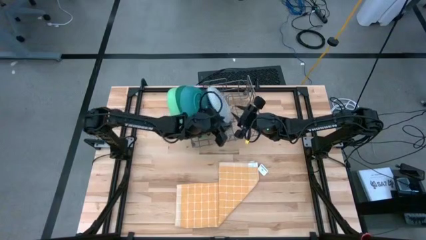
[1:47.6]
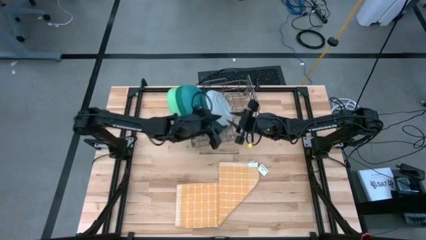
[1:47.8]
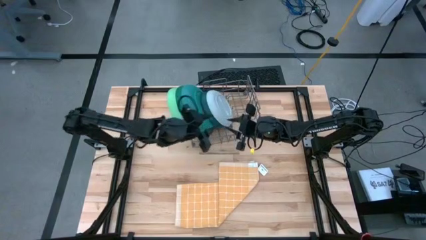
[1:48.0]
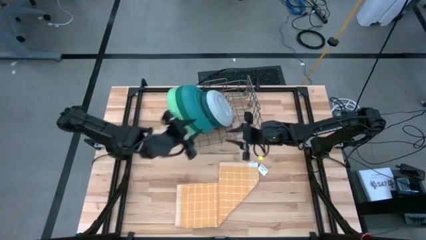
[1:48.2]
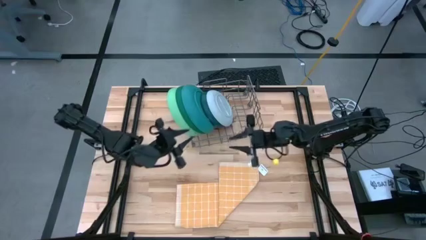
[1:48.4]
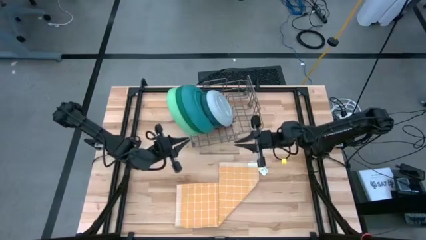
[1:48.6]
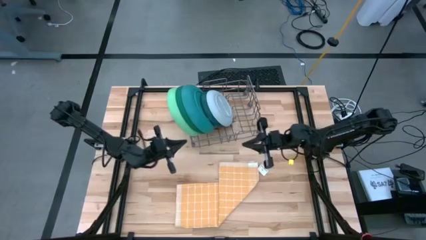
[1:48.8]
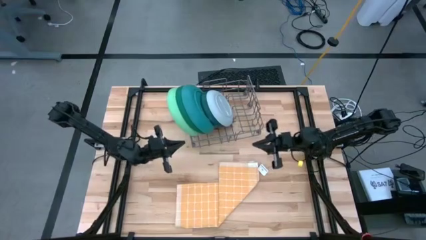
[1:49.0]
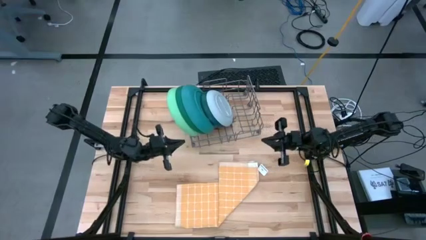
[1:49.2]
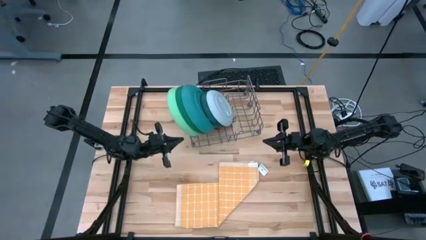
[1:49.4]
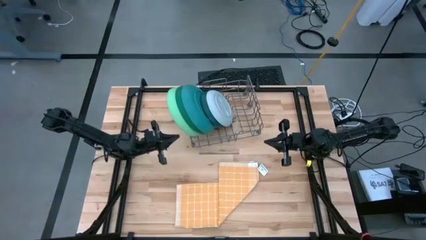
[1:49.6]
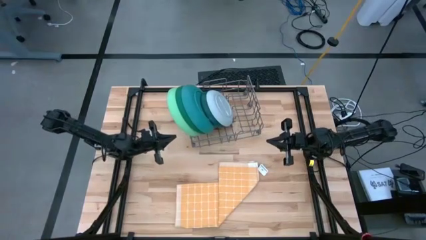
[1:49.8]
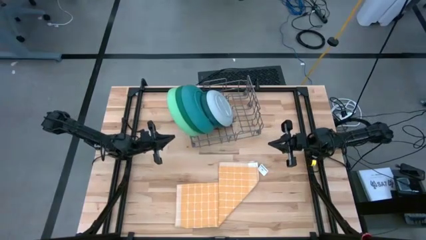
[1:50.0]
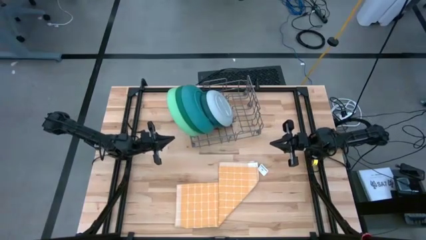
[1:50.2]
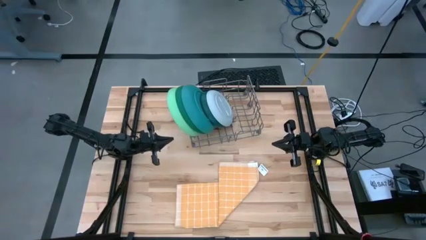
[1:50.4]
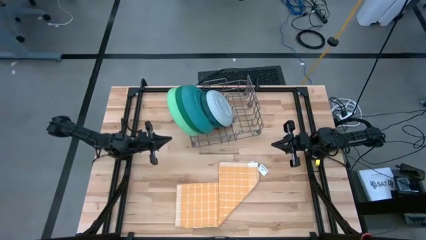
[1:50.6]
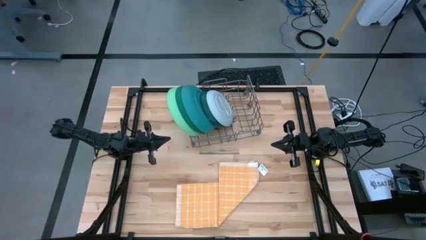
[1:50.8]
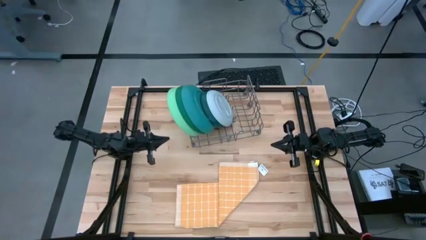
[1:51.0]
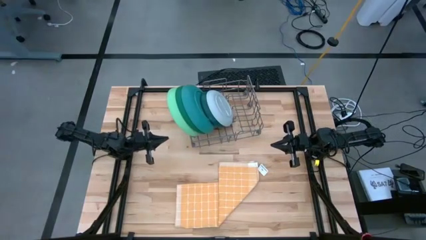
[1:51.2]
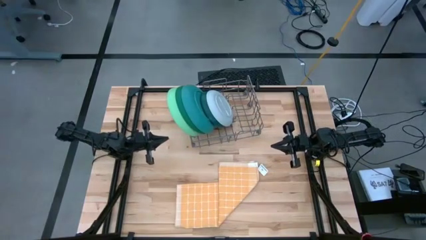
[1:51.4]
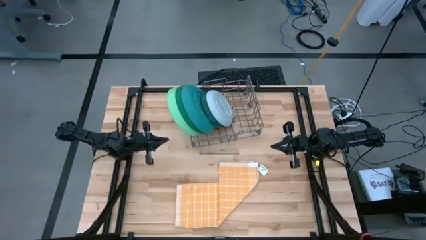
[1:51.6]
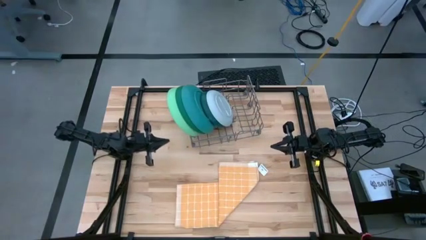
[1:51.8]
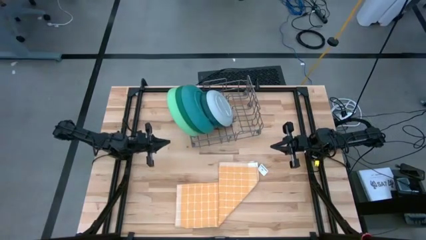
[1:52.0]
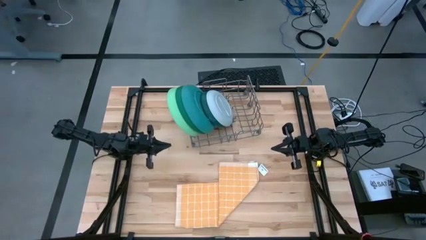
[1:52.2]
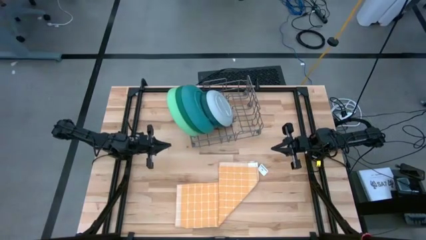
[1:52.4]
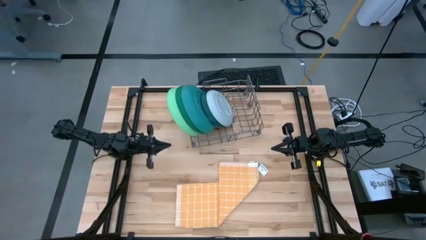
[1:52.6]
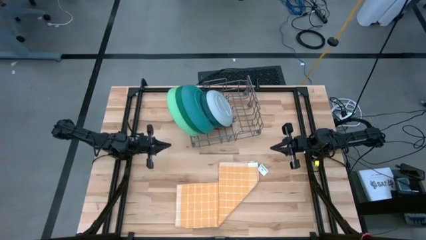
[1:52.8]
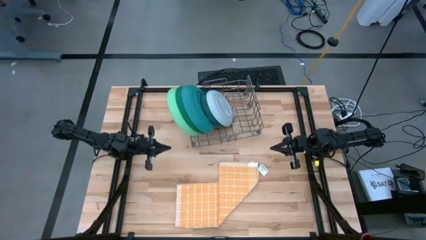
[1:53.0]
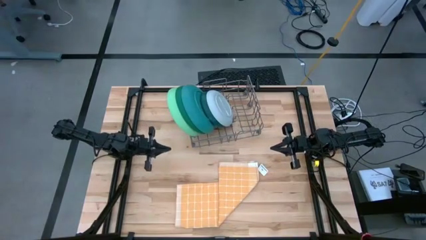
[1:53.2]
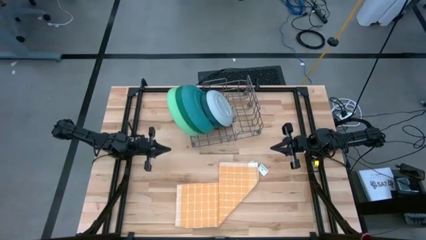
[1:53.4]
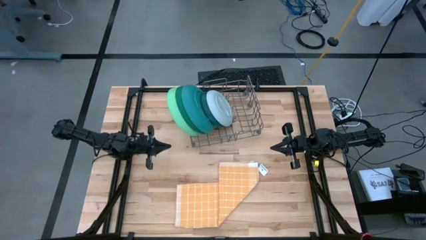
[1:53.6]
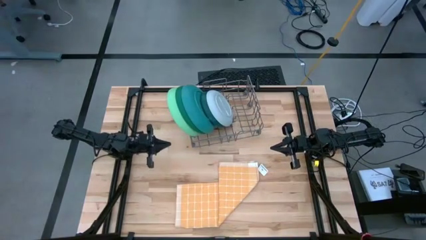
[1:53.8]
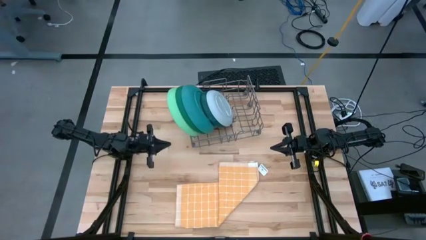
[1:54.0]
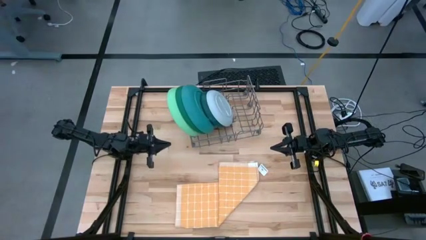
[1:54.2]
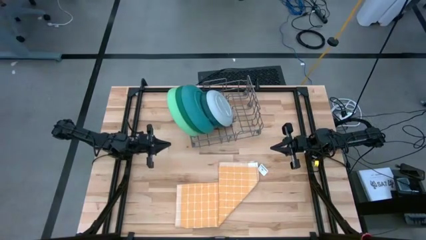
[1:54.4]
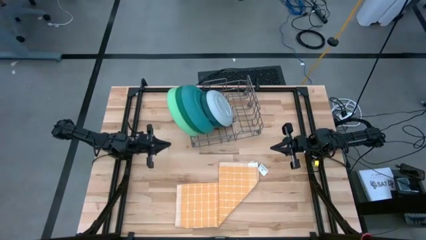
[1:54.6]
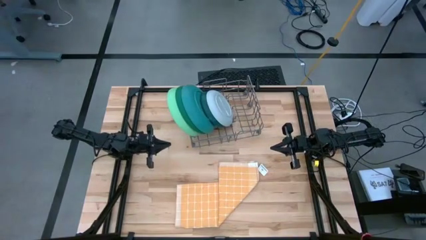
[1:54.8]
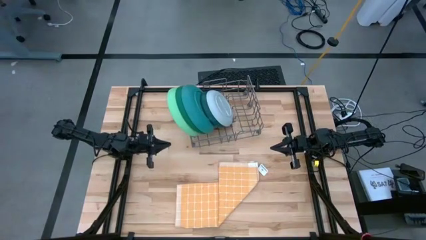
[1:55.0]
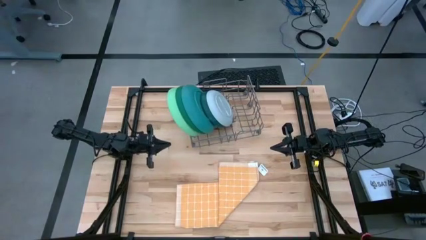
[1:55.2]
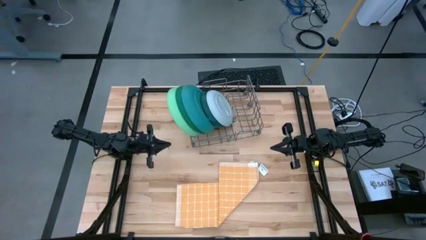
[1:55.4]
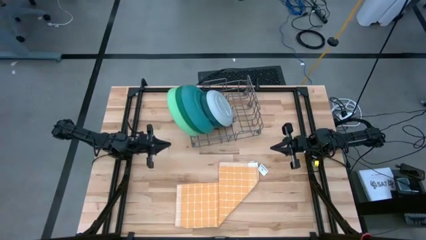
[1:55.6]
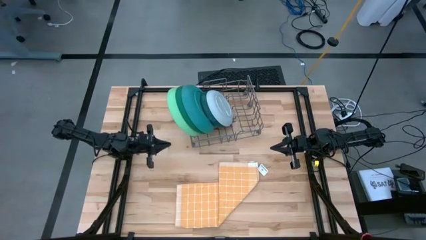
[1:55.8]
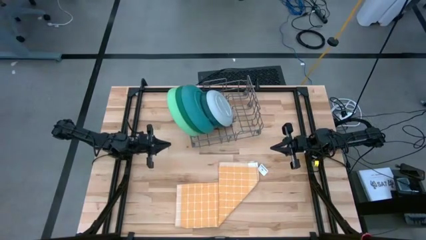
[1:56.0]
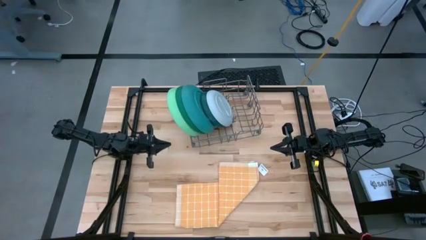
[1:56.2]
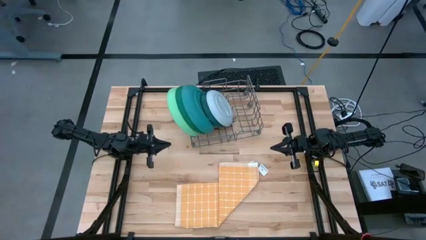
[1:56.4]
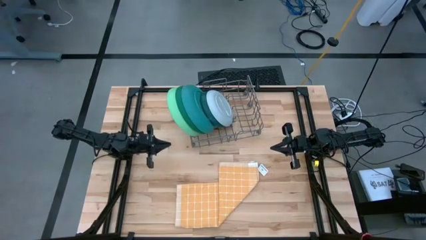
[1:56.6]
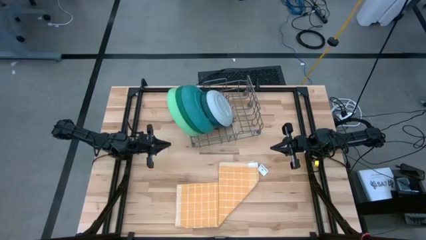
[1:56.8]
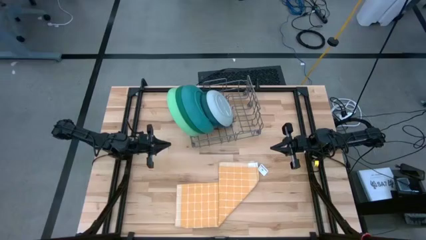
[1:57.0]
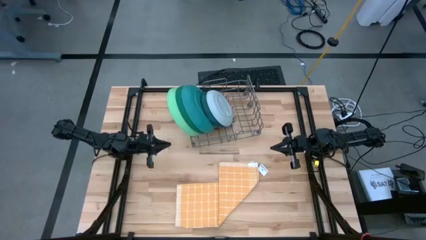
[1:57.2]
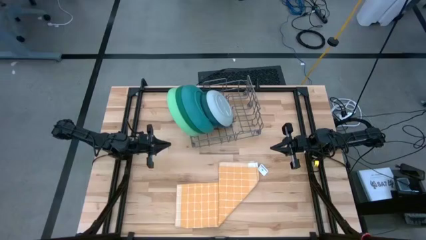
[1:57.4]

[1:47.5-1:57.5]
Task: Sort dishes
Return to Home Position

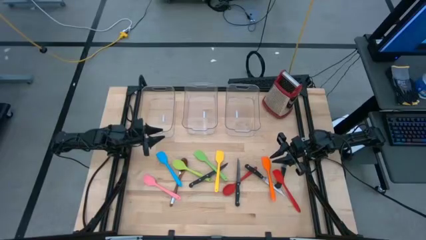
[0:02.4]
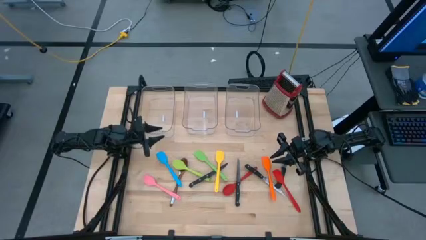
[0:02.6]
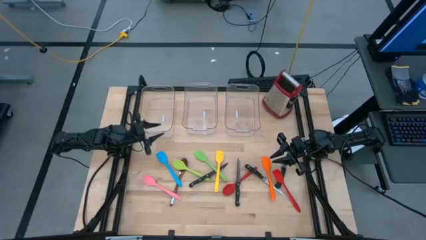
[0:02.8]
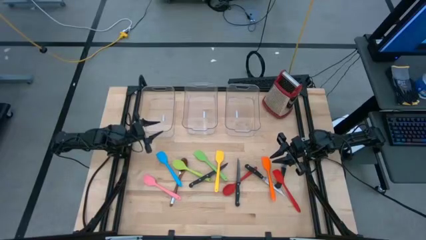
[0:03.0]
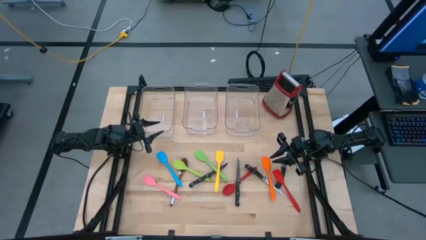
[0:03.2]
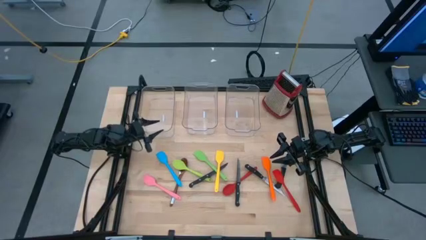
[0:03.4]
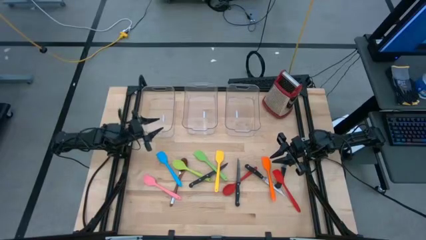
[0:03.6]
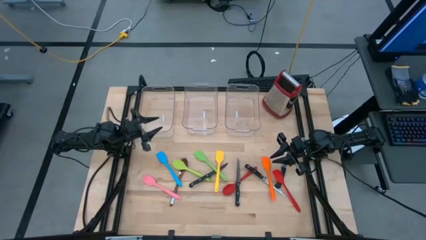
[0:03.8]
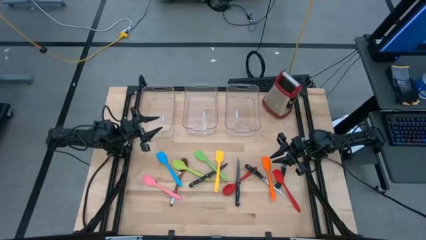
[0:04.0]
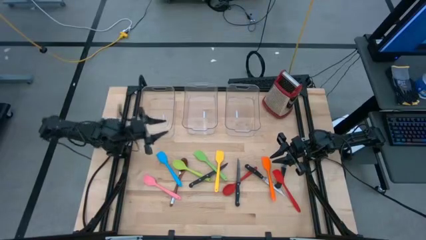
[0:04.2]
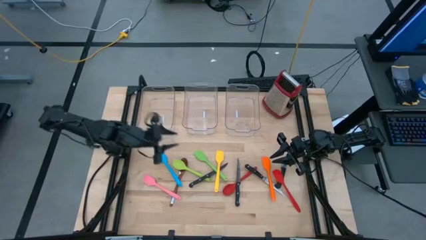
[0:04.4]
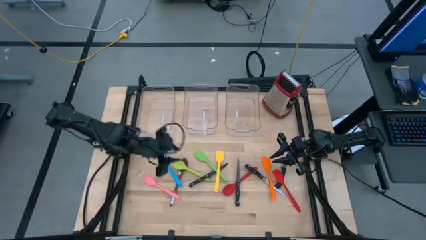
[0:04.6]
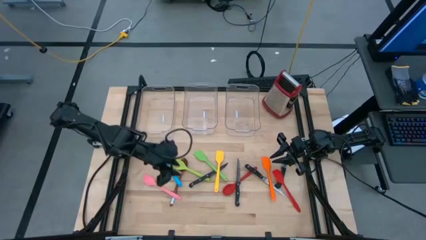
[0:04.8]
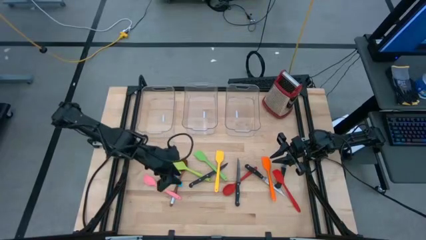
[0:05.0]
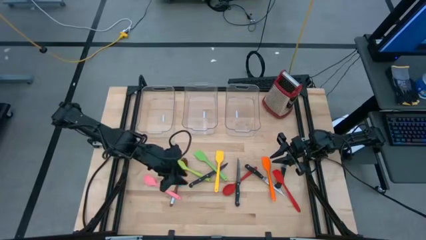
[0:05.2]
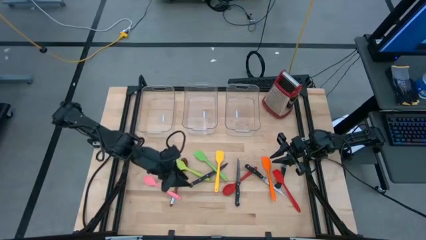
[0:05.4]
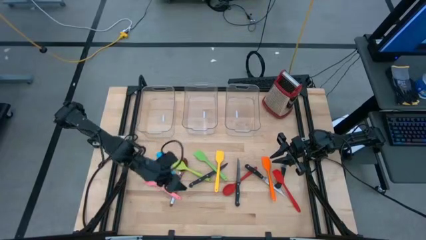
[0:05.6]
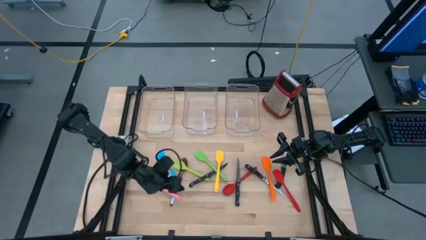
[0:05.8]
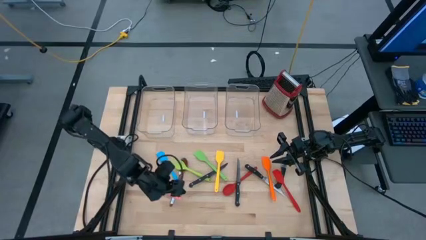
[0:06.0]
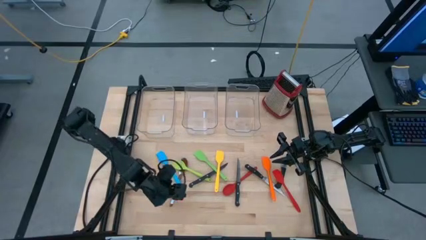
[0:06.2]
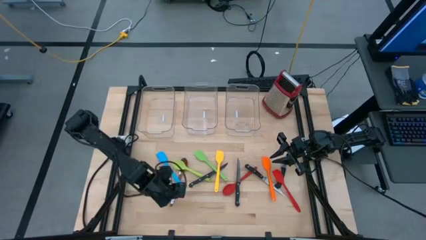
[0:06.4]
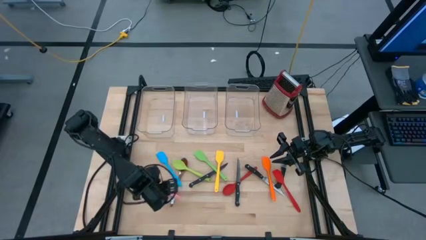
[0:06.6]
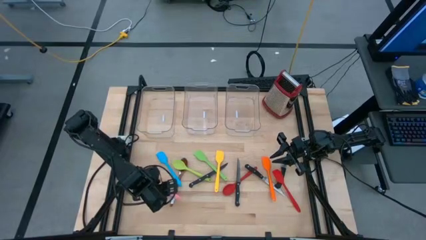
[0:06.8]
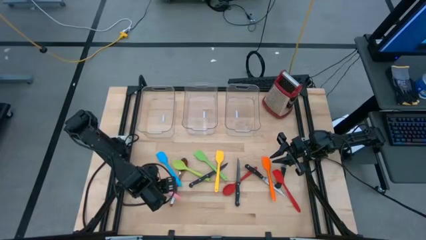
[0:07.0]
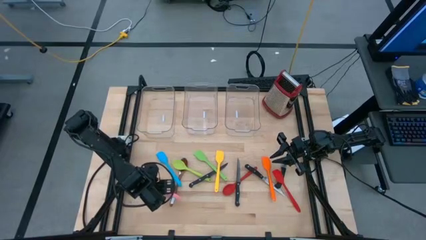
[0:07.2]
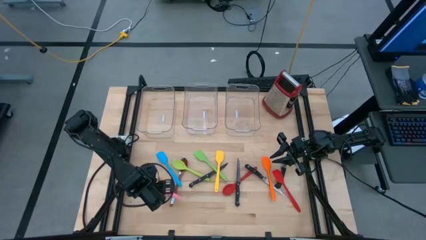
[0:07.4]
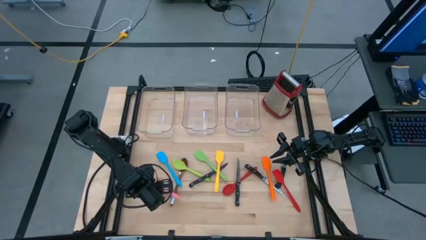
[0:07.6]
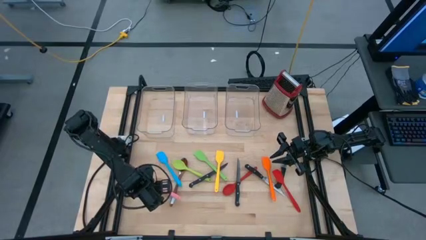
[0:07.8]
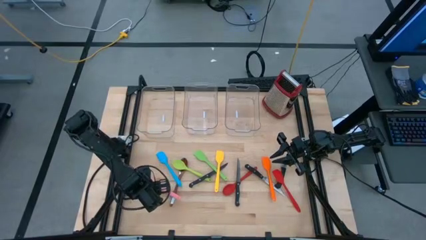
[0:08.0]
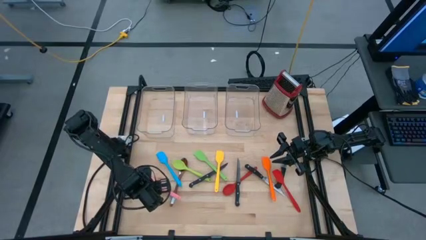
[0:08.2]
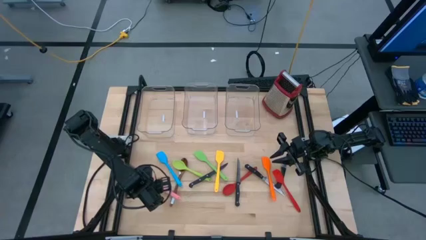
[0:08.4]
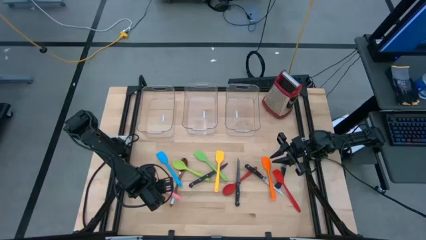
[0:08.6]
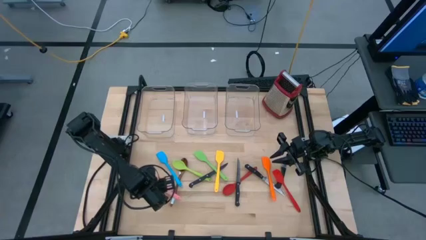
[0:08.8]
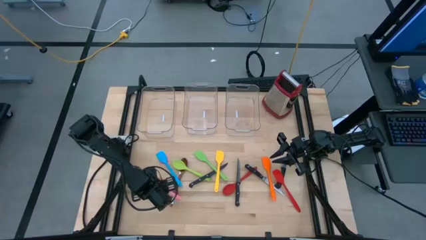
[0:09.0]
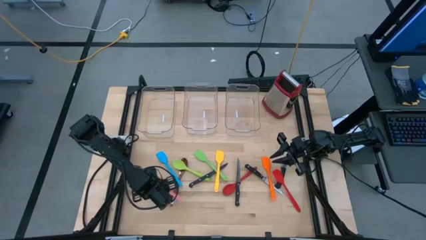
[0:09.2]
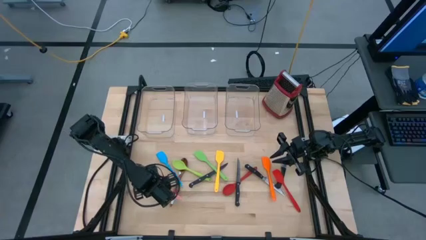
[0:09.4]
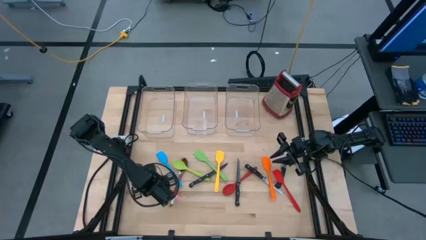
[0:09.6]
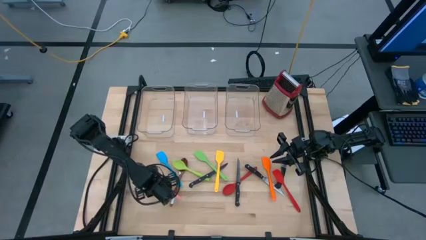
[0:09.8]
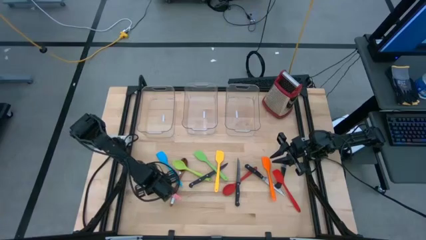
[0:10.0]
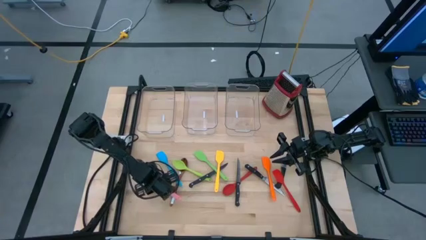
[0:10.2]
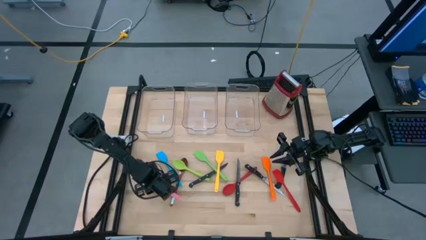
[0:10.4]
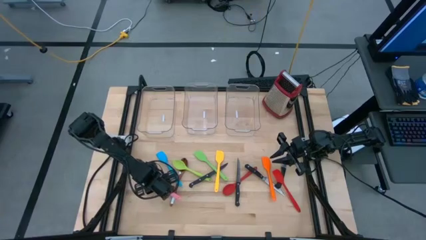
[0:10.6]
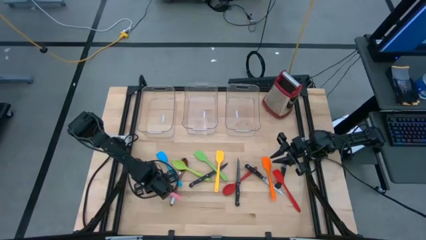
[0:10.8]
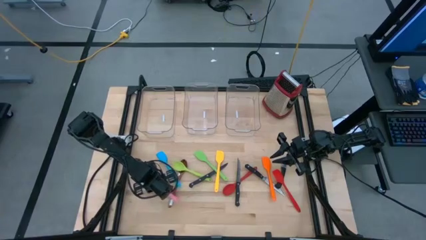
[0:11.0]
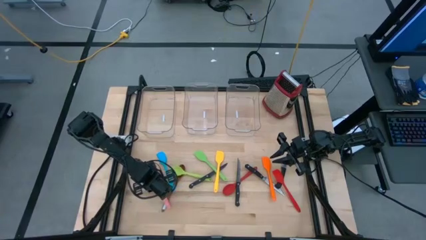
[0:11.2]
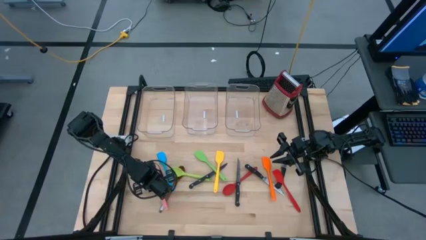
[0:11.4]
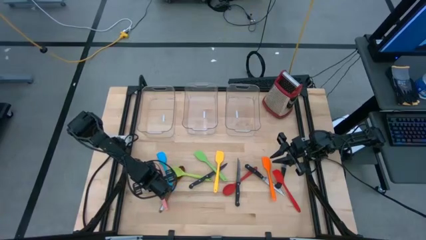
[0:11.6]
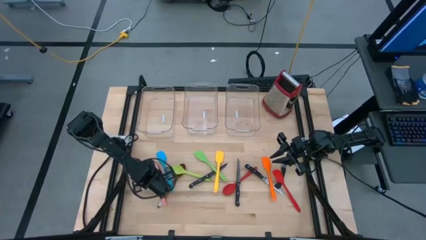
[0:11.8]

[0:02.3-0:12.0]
Task: Pick & Place Kitchen Items
Put the pink spatula into the right transparent bin
